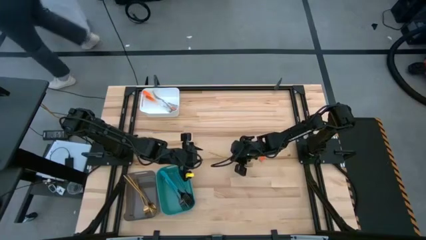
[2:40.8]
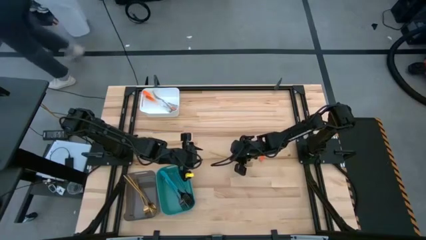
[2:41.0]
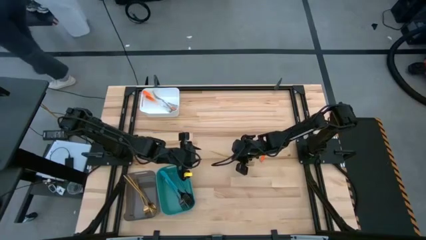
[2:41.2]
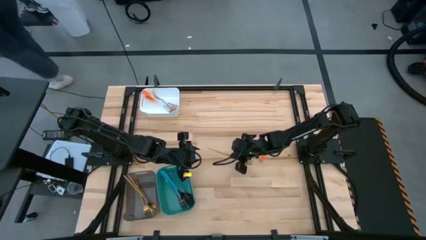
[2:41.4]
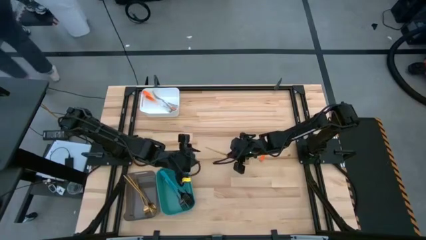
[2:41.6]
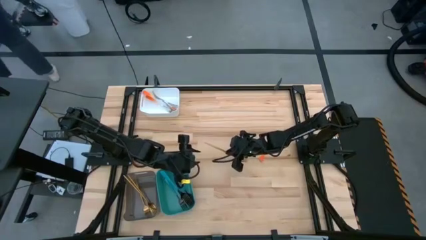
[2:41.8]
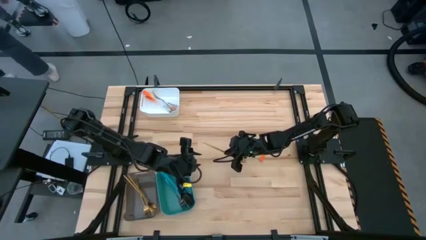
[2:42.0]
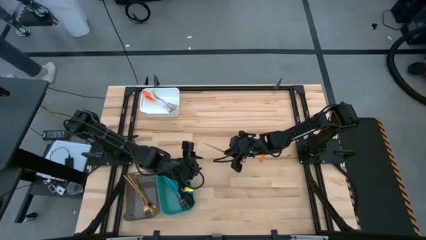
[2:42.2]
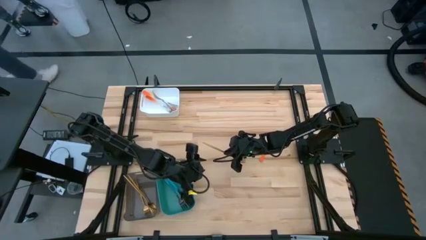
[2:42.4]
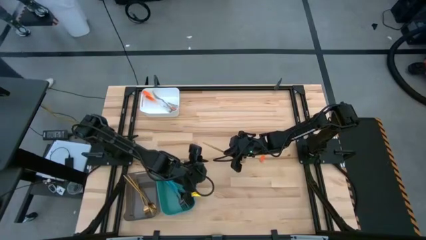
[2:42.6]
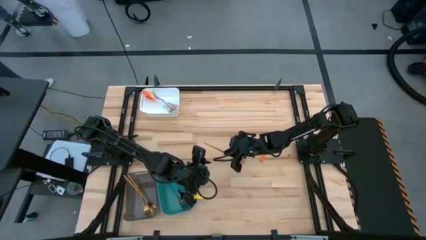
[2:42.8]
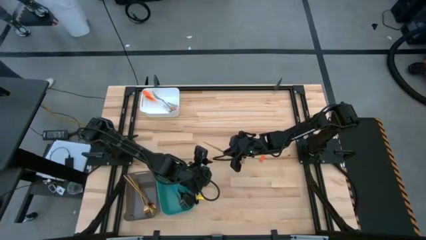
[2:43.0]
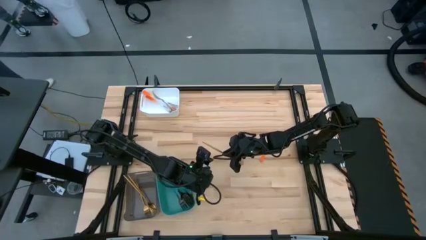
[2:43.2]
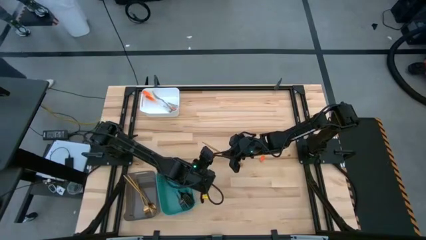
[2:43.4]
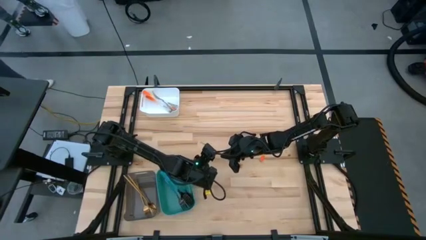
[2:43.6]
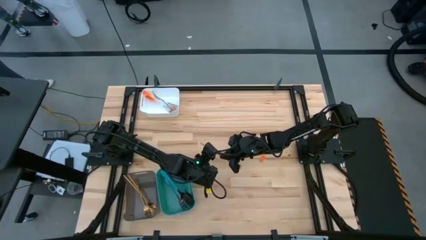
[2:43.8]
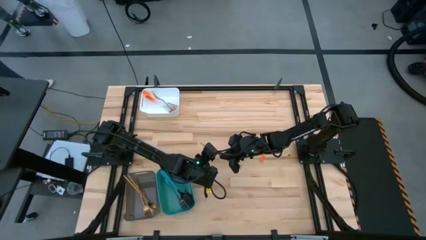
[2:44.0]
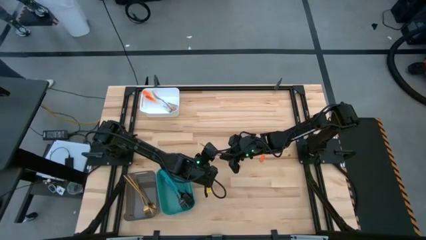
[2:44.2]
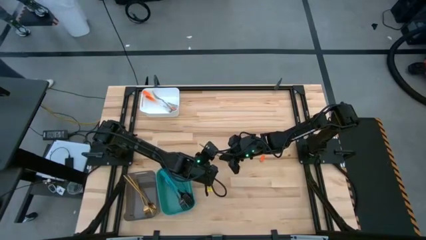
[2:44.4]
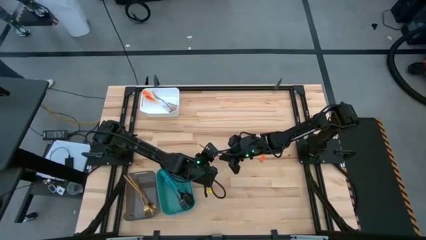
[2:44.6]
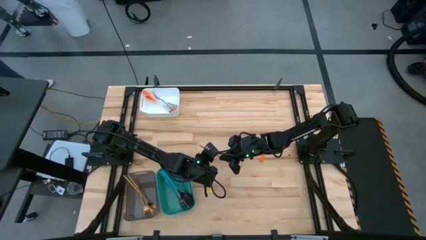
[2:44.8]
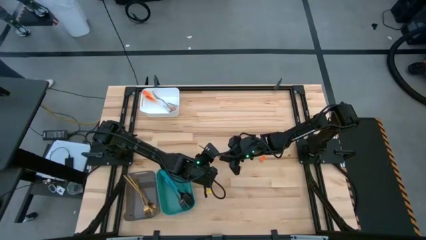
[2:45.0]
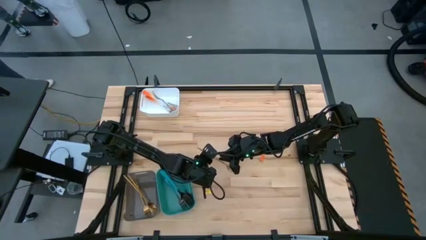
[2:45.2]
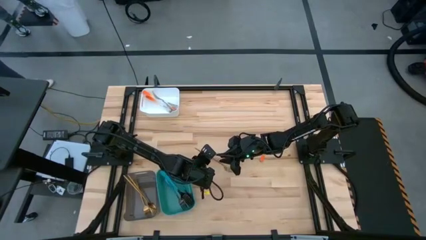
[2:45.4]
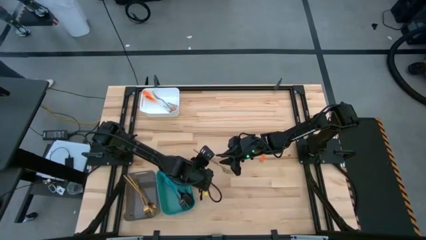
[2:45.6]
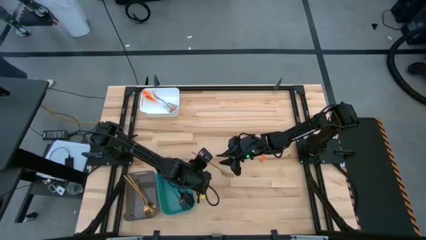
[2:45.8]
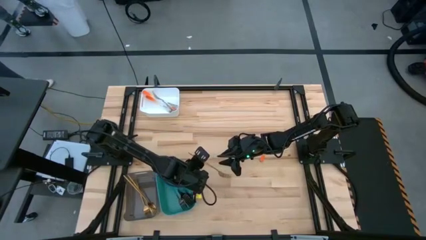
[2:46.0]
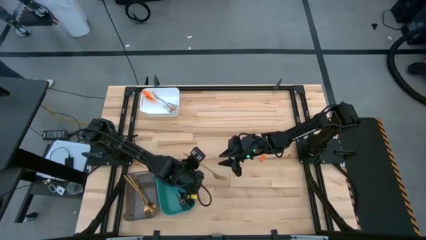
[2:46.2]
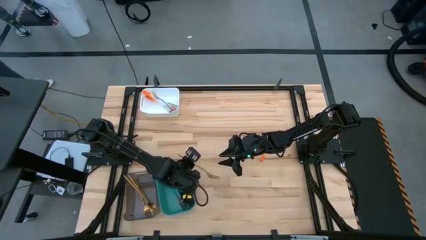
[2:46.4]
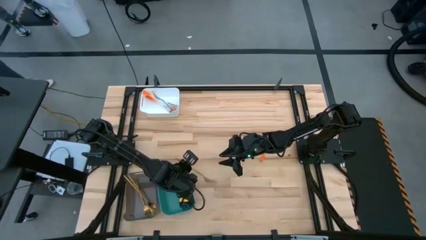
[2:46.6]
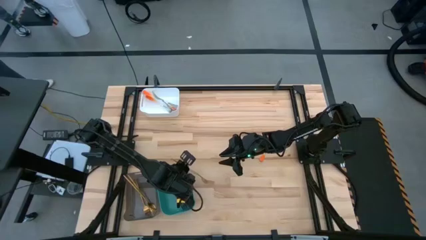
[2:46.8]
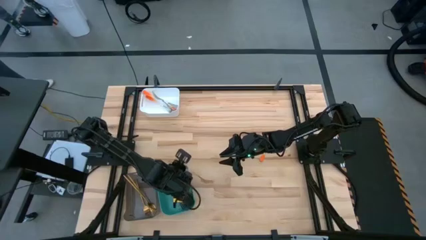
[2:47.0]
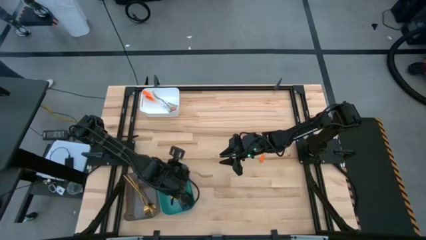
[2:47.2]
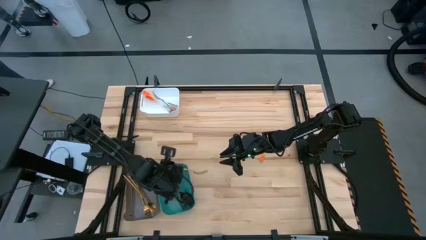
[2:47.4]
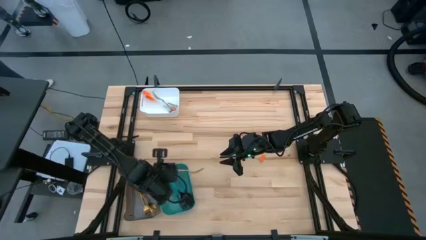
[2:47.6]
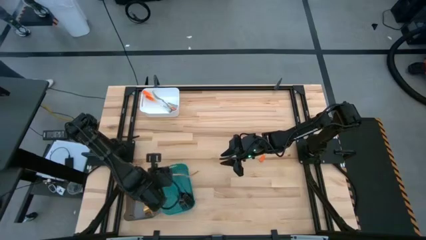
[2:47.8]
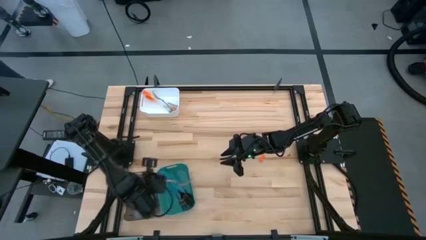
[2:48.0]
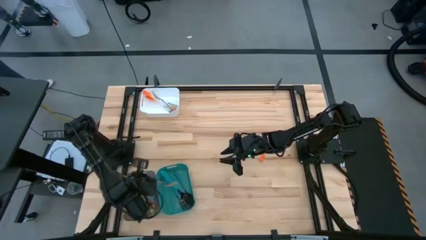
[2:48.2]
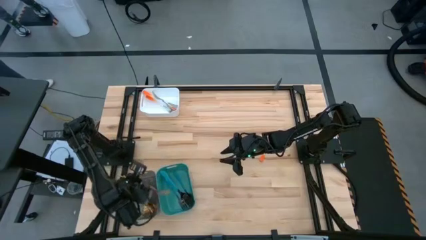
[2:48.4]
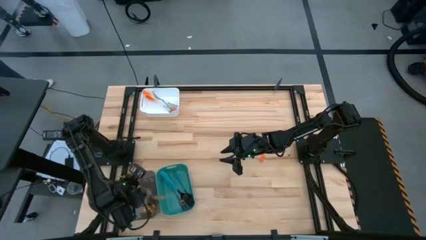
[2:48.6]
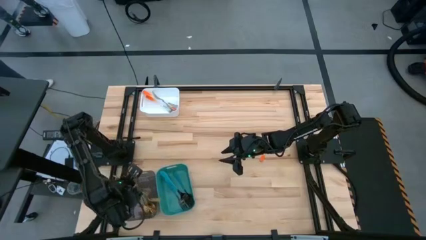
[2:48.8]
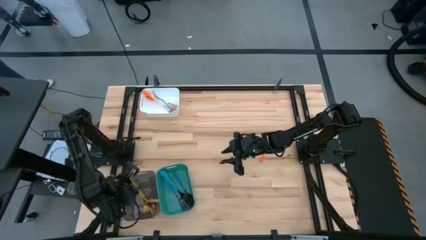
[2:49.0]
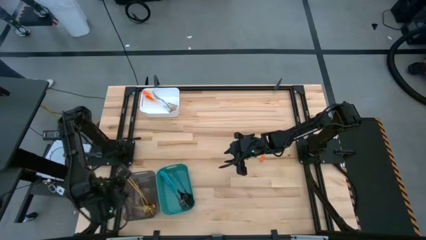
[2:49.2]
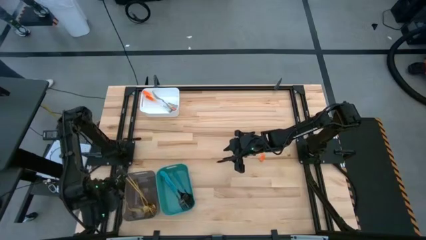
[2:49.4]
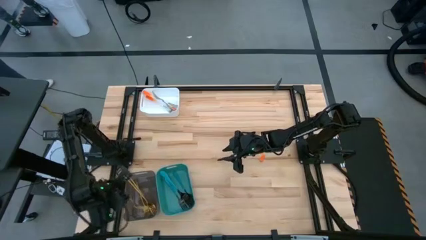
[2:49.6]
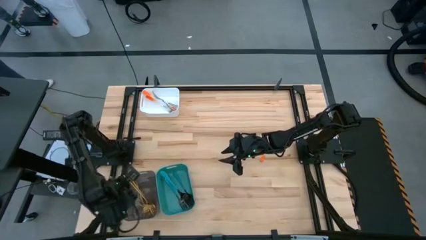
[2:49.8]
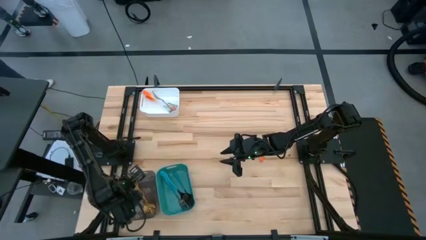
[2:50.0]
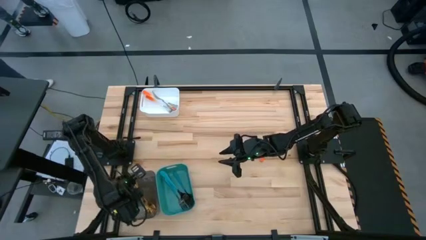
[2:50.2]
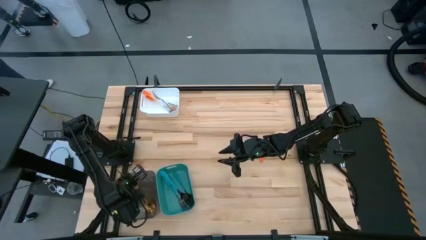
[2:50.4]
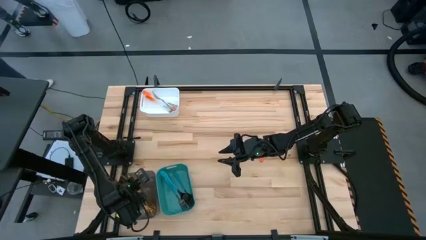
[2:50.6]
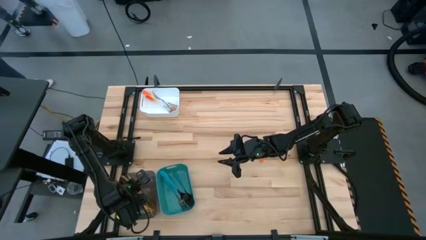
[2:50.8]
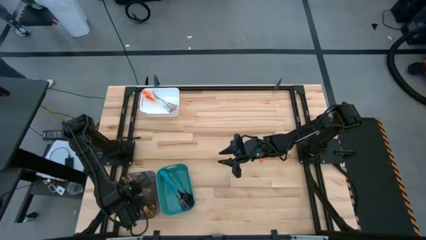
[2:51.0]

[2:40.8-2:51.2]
Task: Sort silverware by color (type)
Put the gold fork into the black bin

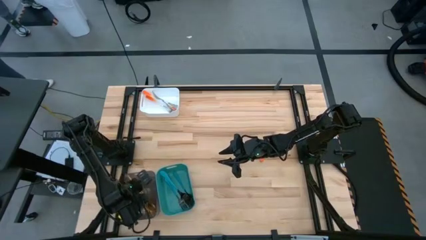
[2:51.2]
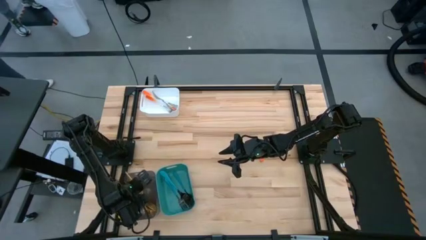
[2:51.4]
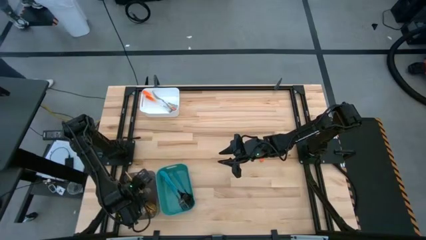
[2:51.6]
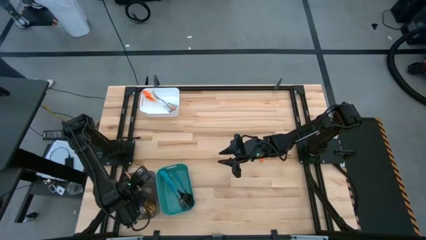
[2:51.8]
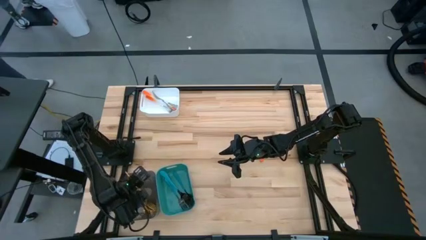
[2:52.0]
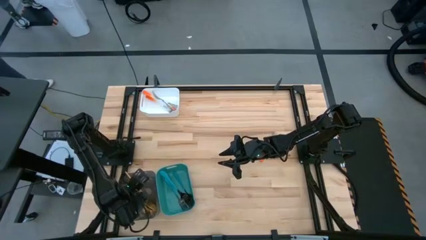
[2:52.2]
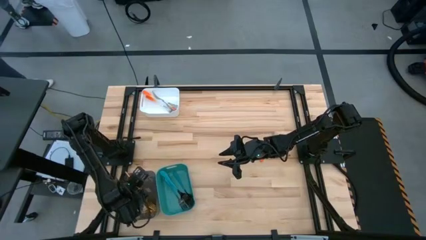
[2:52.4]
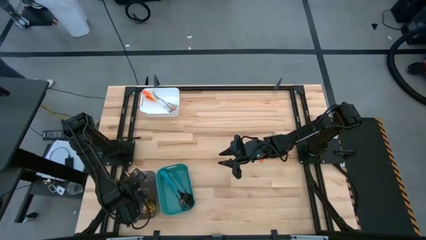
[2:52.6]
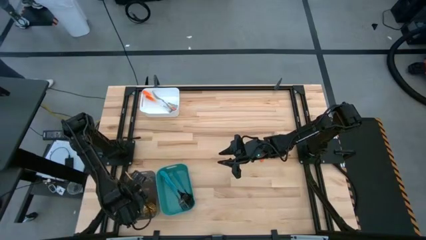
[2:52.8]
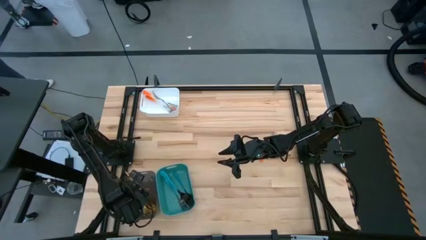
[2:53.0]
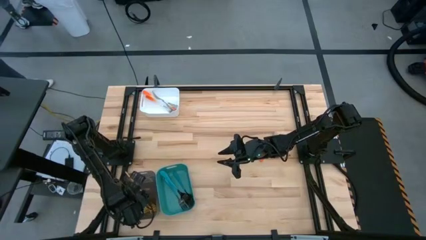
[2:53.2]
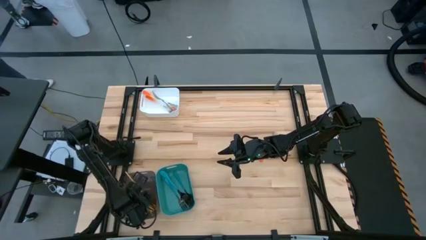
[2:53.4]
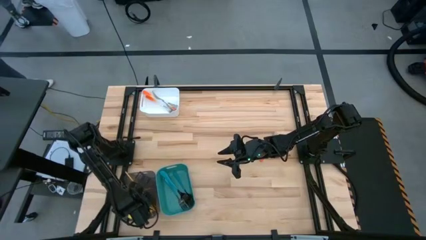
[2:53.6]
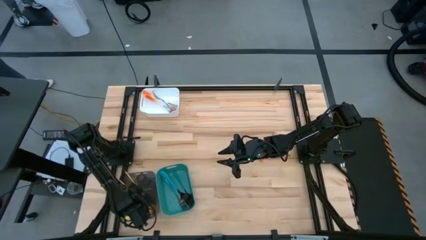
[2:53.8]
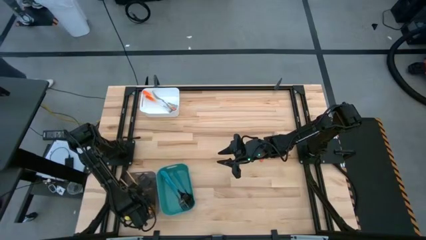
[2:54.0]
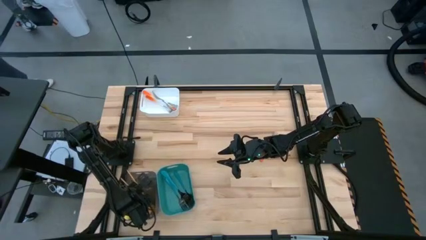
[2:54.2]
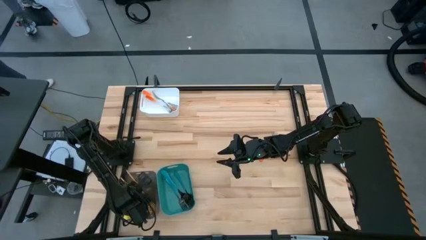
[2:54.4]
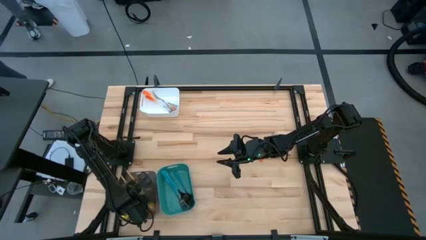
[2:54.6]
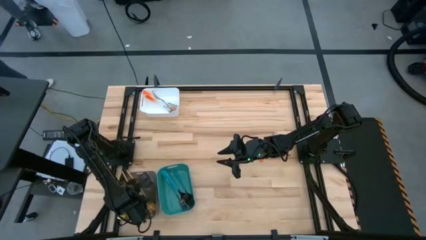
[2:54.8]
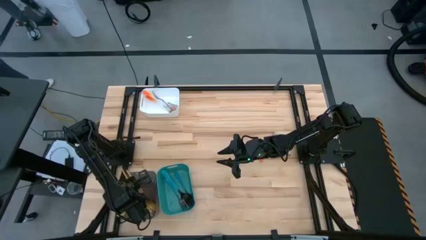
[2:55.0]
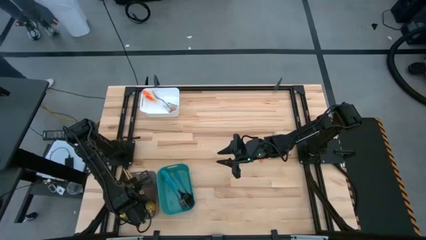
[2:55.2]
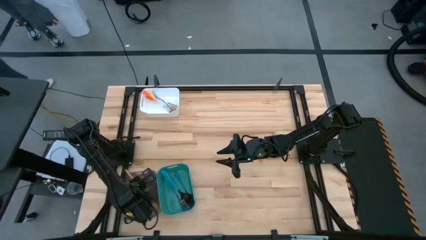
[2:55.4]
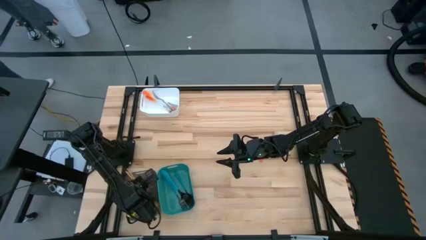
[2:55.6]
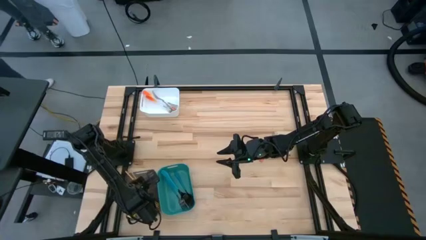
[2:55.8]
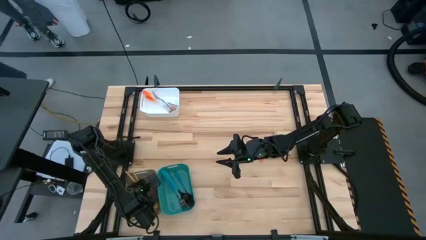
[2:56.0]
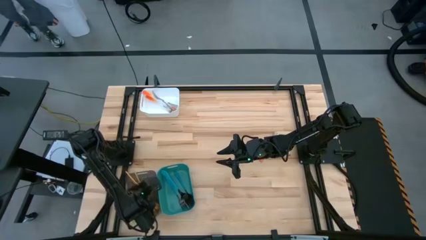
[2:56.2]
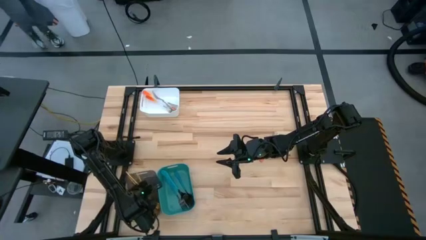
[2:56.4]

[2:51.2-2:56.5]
Adjust the gold fork in the black bin
